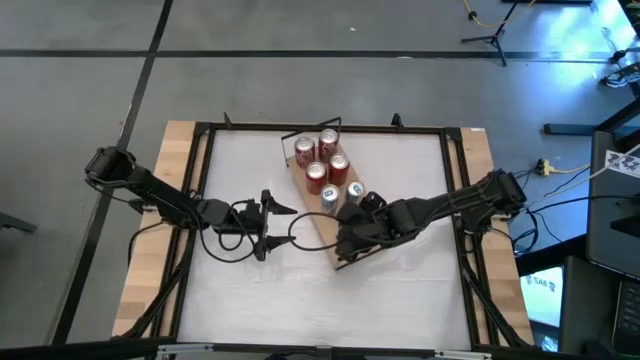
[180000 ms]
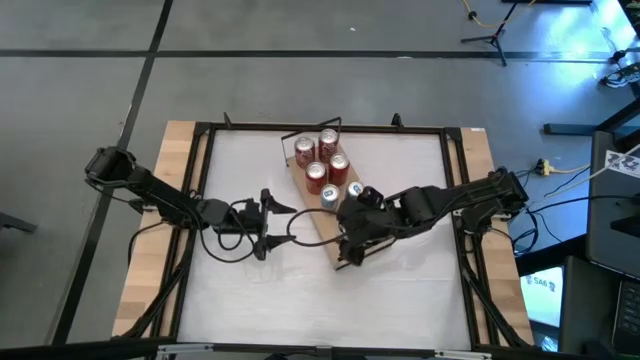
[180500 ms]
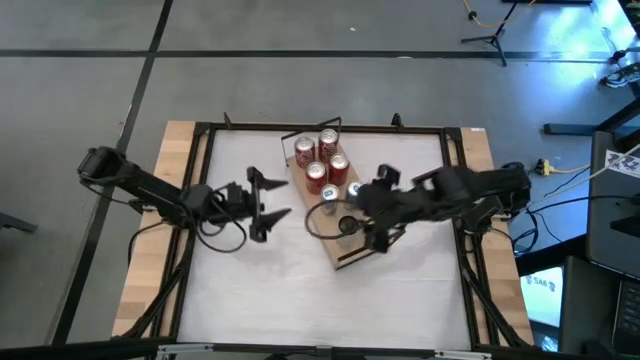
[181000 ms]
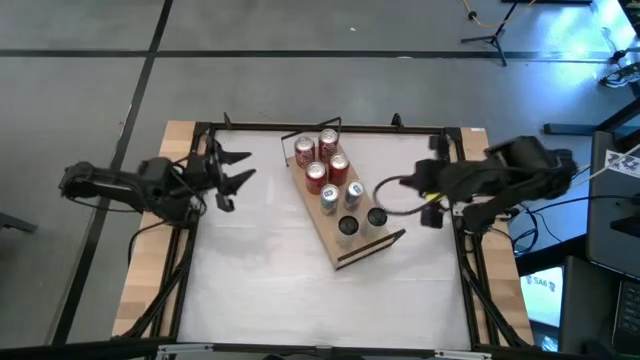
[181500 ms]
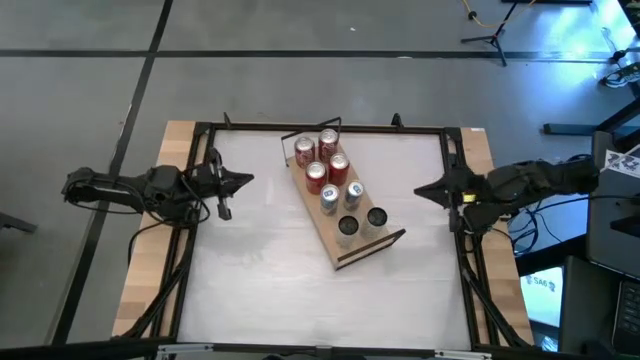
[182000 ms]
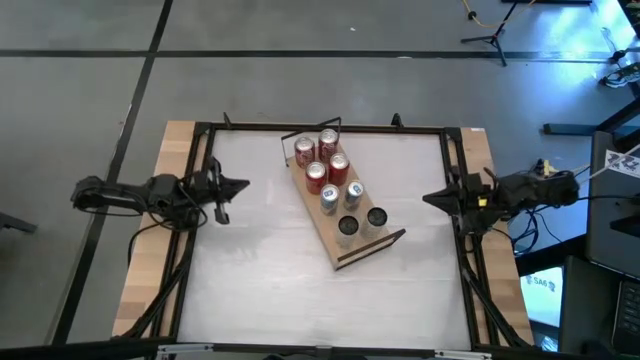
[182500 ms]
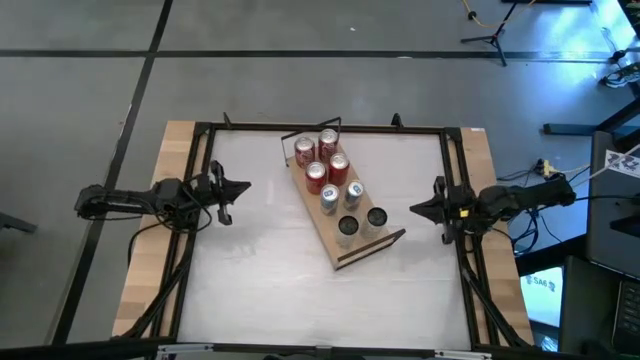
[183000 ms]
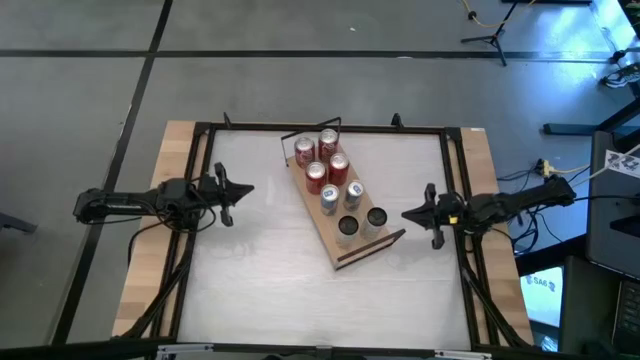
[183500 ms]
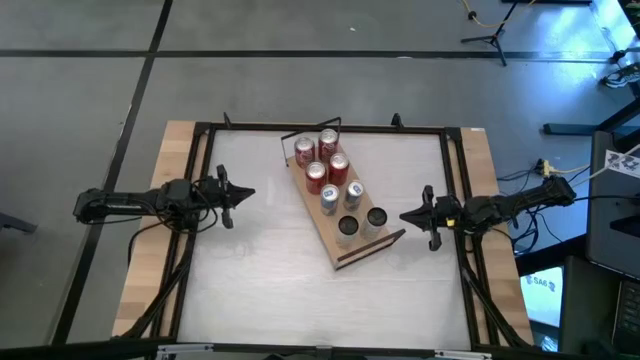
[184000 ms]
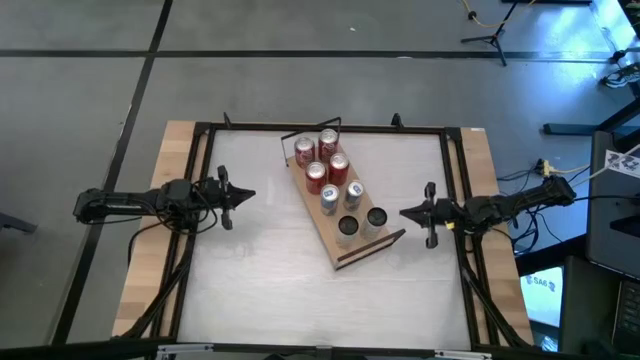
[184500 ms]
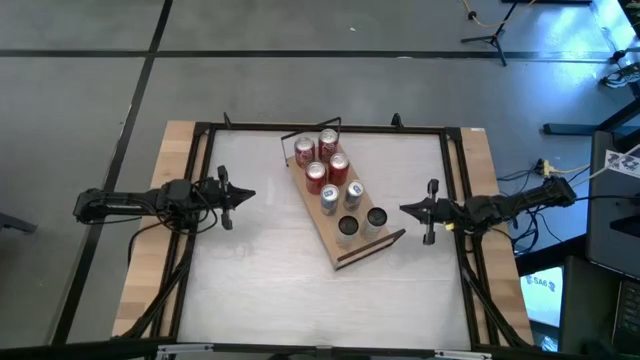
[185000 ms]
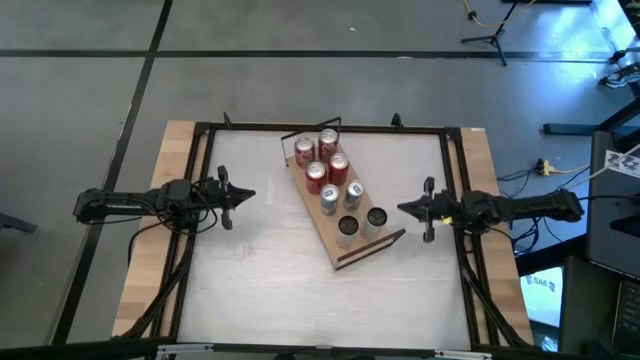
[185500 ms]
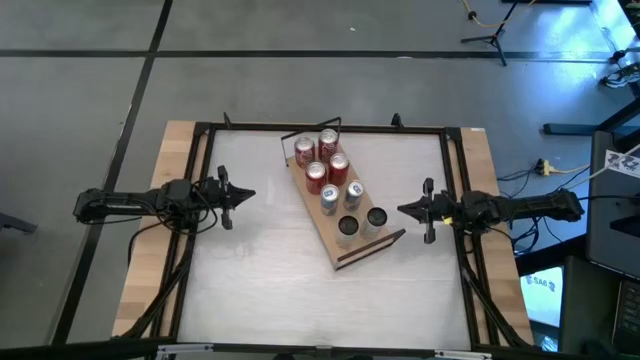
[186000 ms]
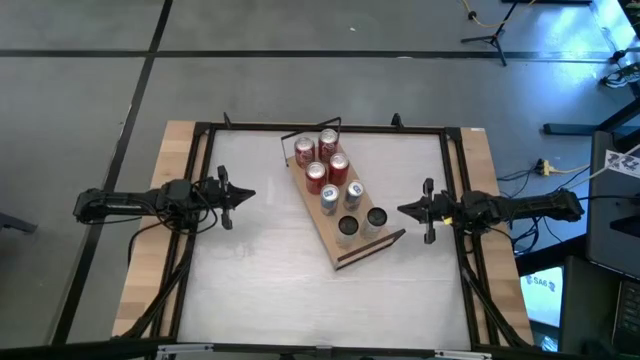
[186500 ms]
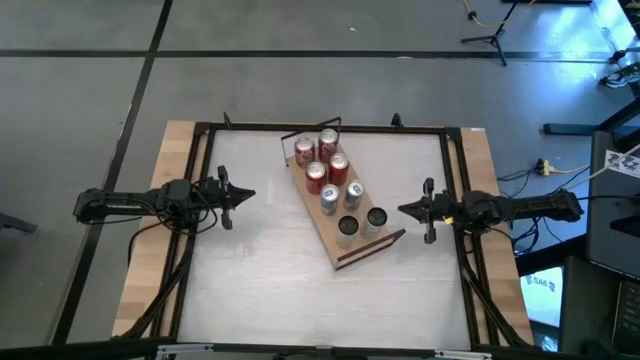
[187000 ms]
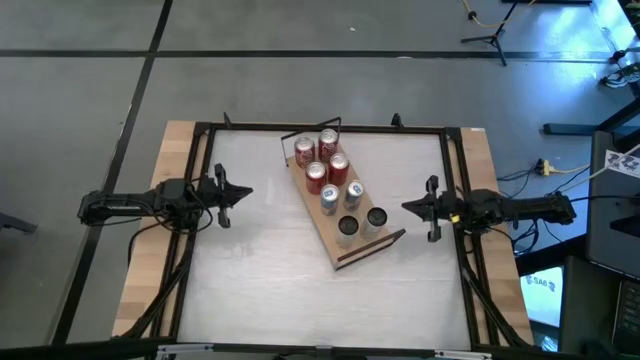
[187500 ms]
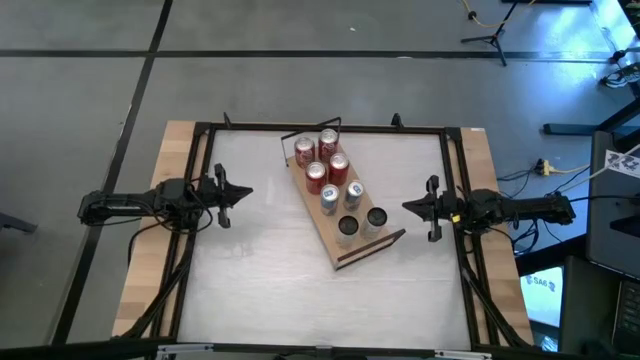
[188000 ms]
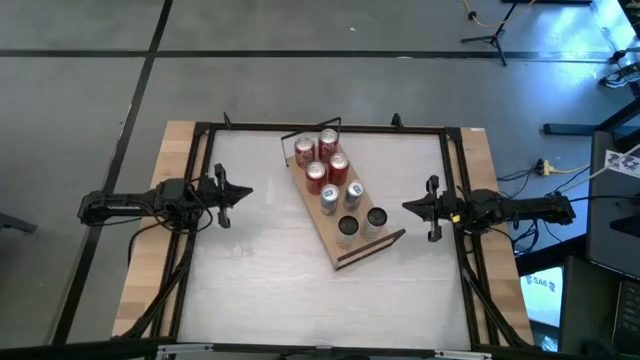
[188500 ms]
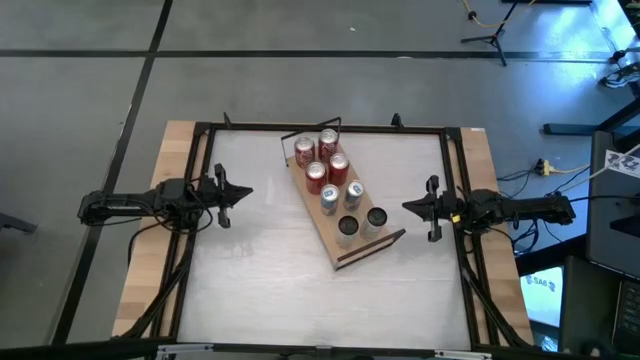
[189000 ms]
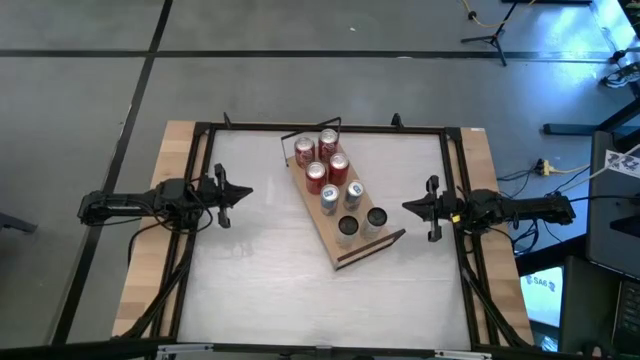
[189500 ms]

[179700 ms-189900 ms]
Task: Place canned beverage on shelf
Return to Home Position

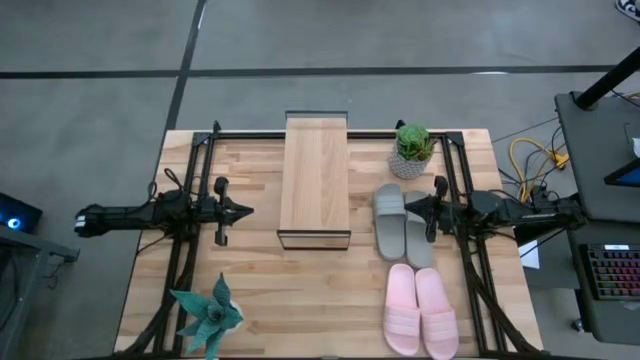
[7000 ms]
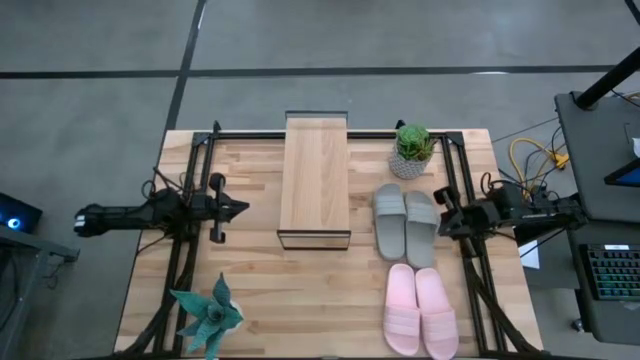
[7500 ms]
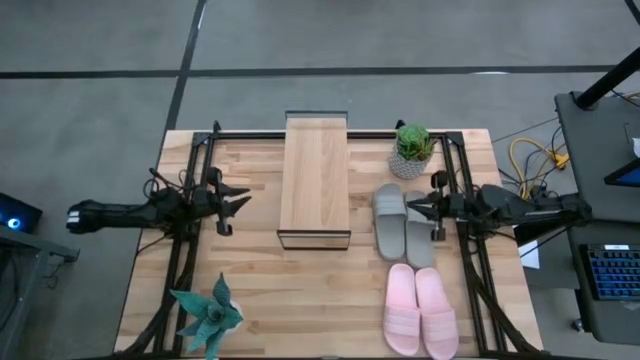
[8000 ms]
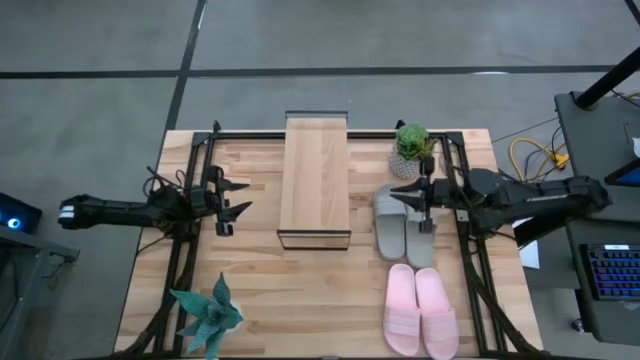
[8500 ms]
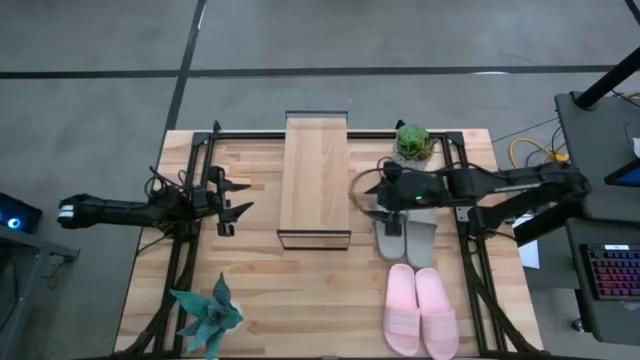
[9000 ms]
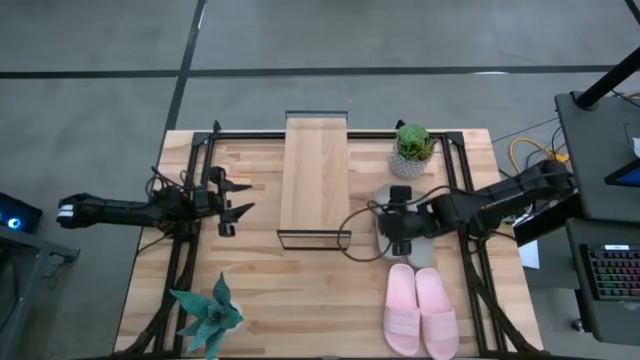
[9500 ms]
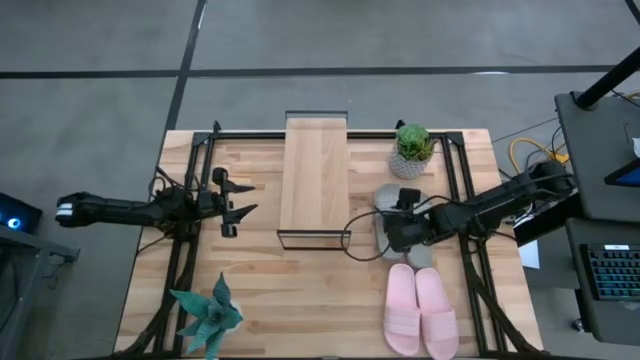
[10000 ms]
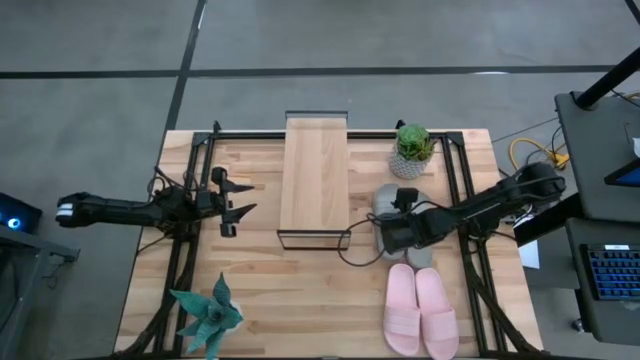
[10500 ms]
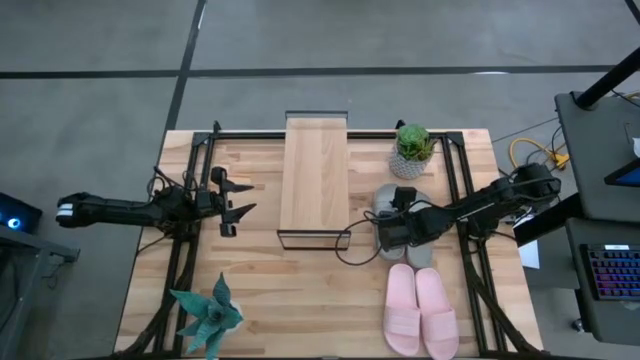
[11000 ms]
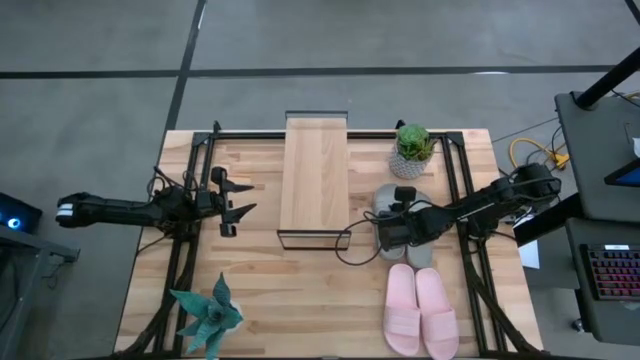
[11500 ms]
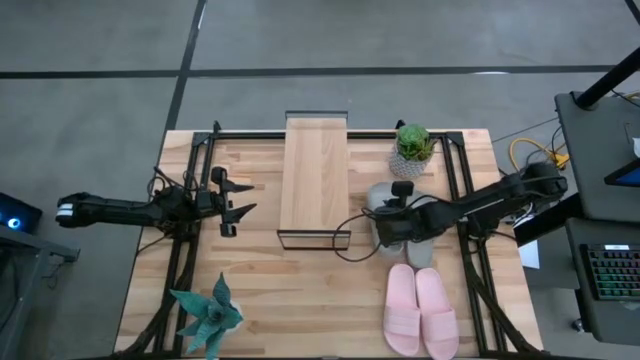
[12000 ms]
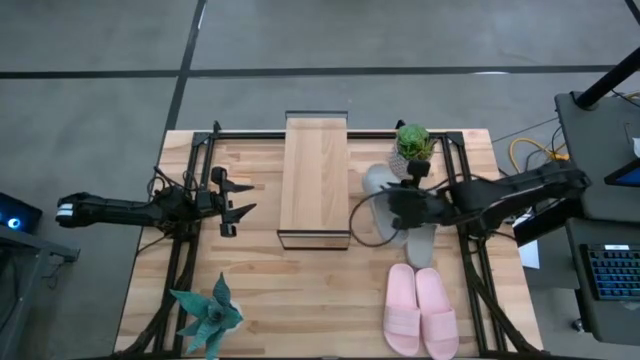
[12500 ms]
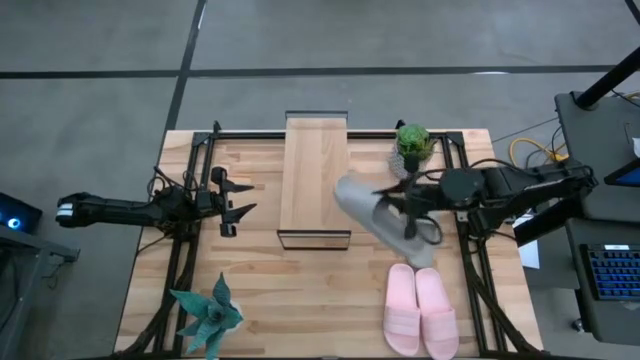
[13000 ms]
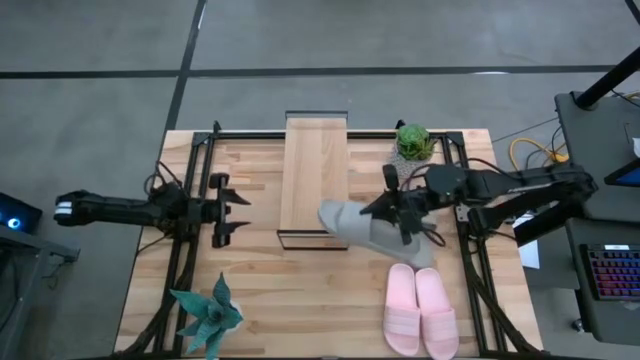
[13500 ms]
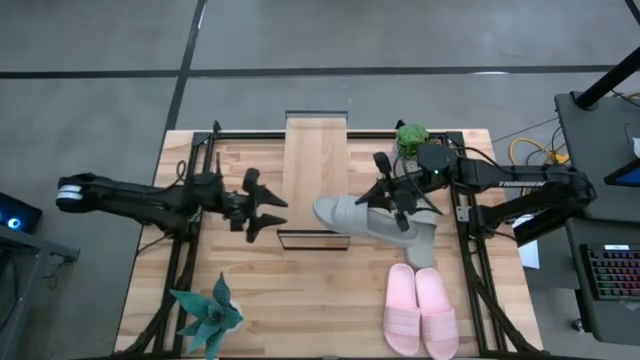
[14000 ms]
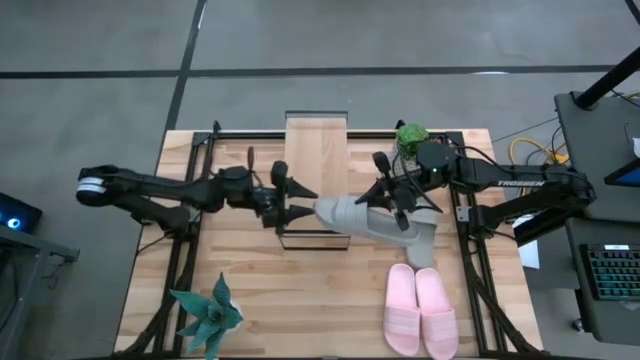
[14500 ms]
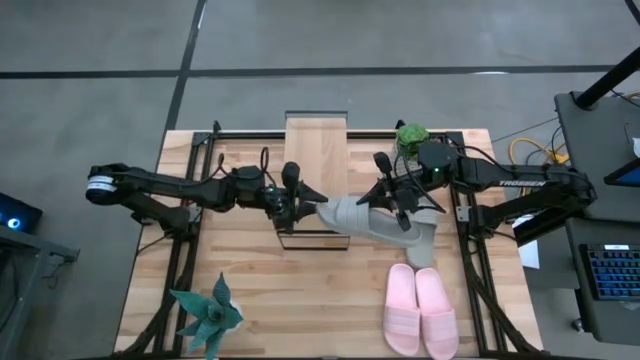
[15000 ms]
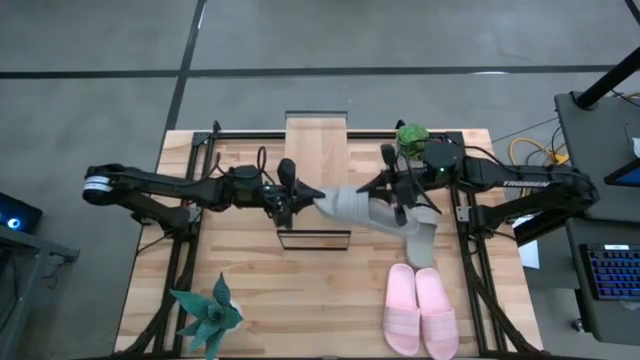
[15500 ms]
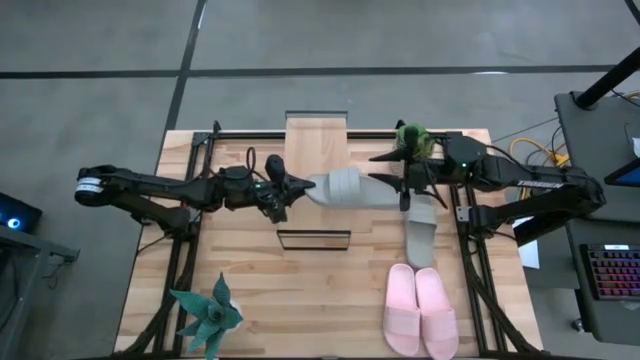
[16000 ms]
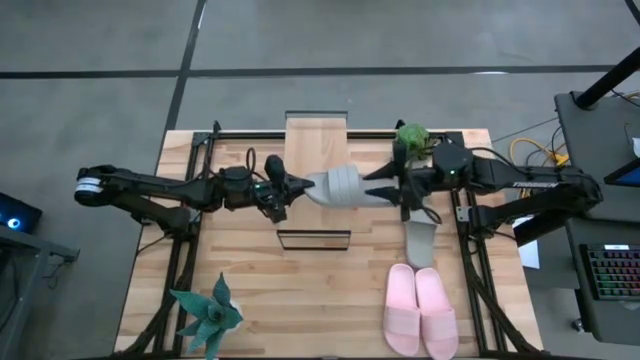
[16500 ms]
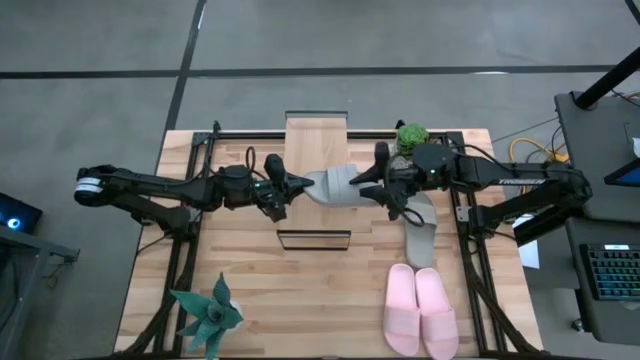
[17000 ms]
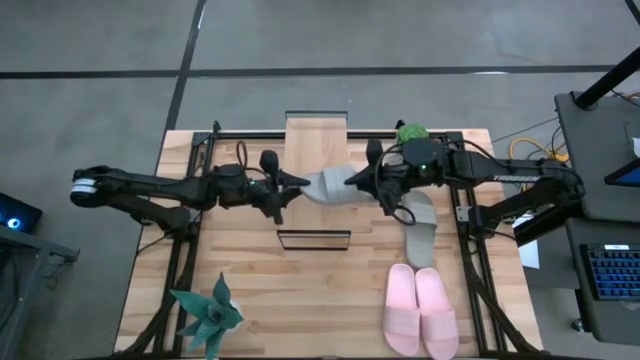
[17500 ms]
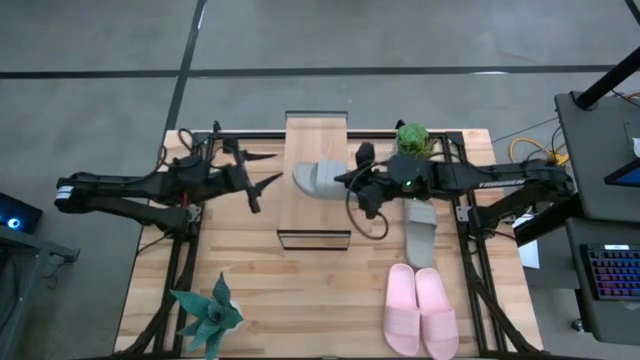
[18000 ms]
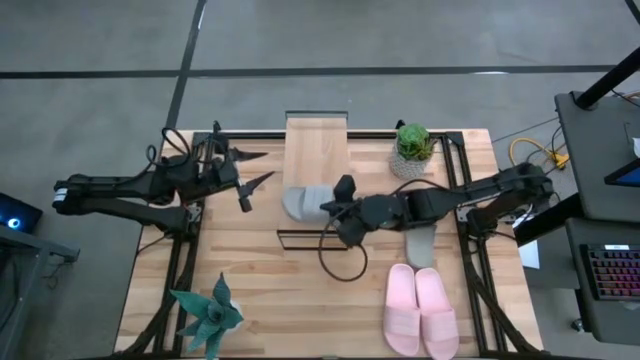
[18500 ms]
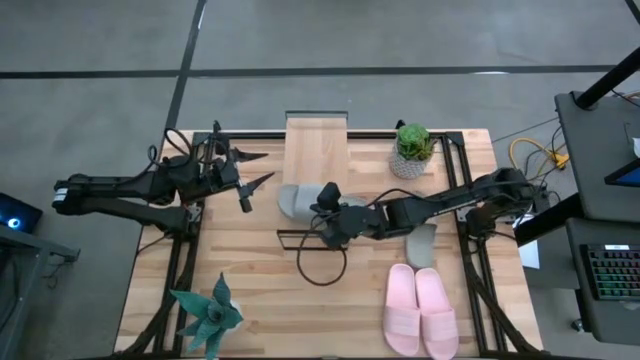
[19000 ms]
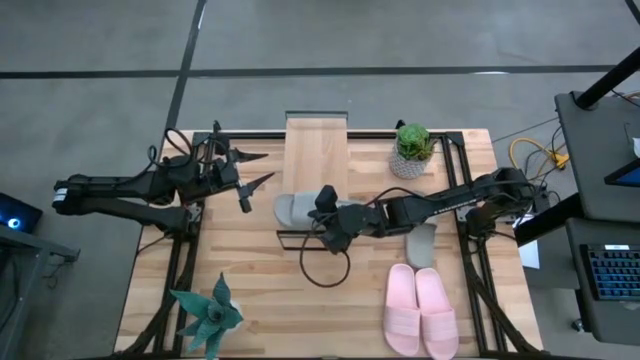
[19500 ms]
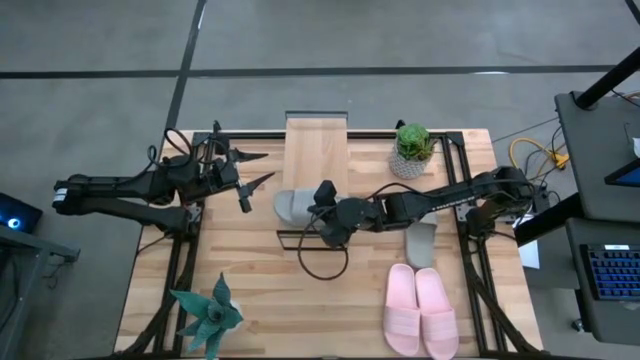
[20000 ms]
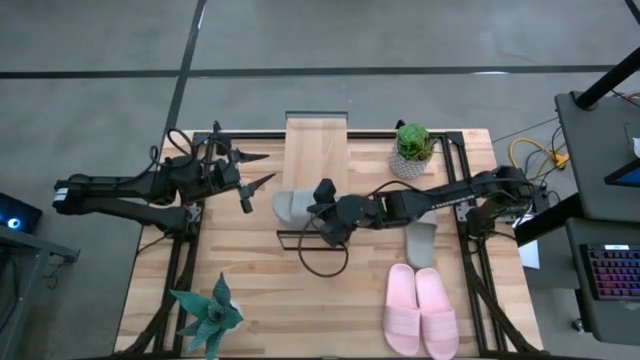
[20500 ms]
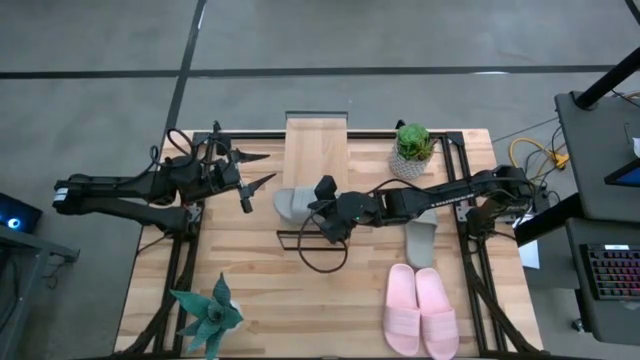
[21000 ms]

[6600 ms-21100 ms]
Task: Pick and place slides into the shelf
Put the left gray slide on the shelf
